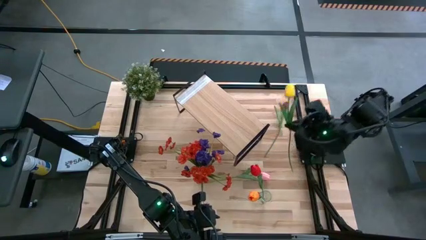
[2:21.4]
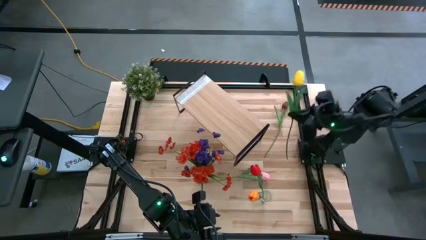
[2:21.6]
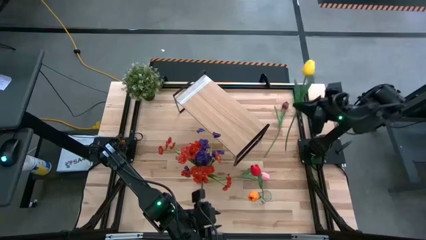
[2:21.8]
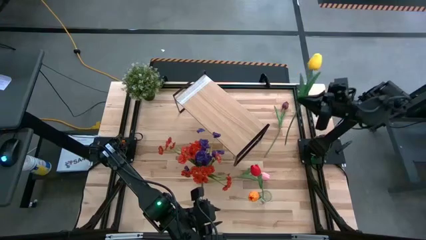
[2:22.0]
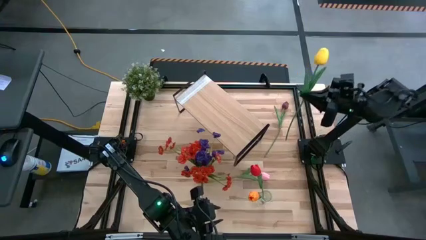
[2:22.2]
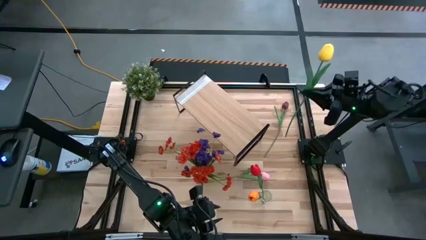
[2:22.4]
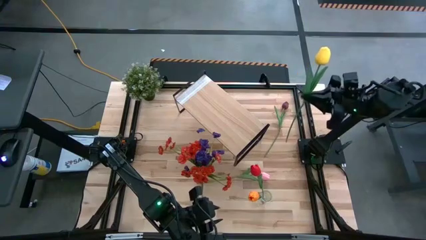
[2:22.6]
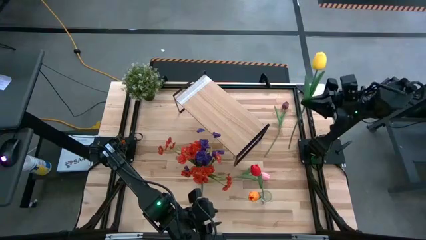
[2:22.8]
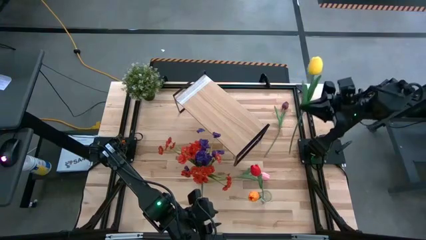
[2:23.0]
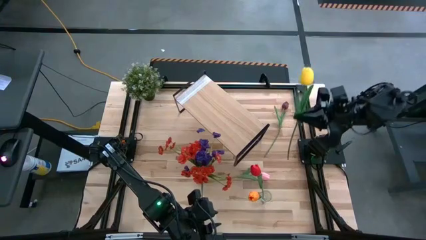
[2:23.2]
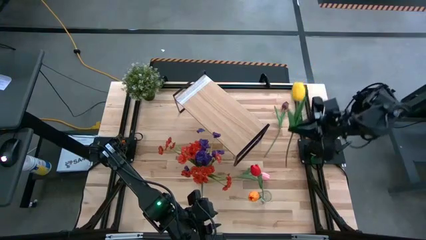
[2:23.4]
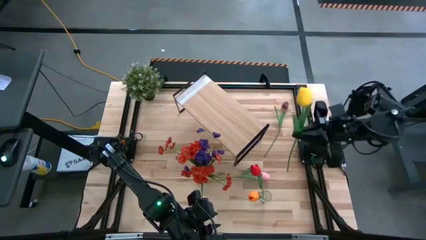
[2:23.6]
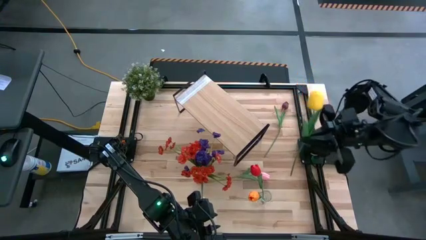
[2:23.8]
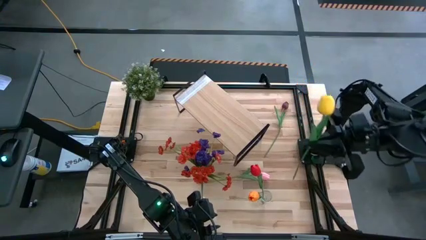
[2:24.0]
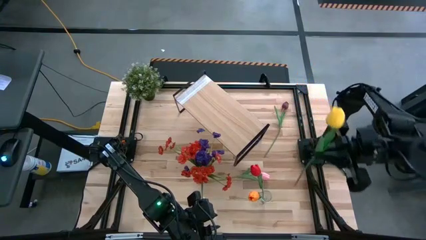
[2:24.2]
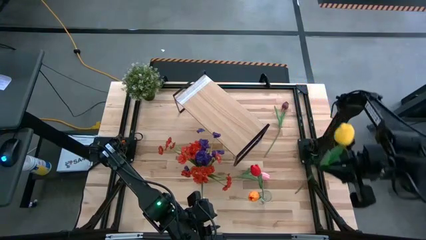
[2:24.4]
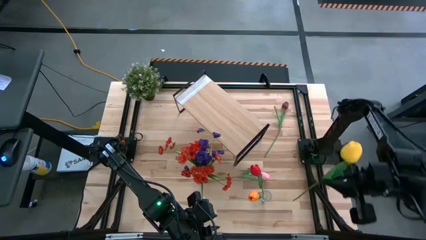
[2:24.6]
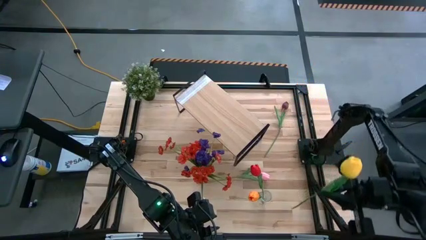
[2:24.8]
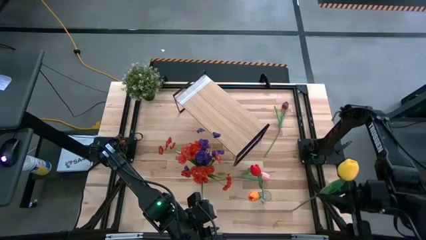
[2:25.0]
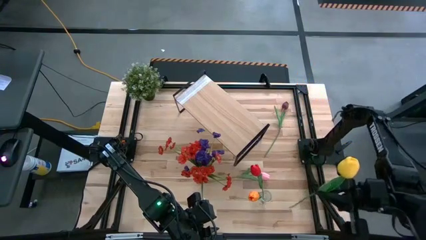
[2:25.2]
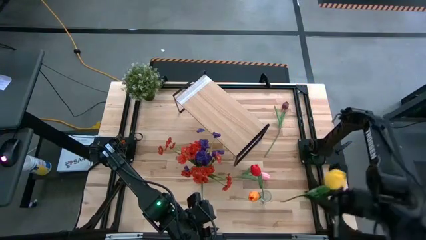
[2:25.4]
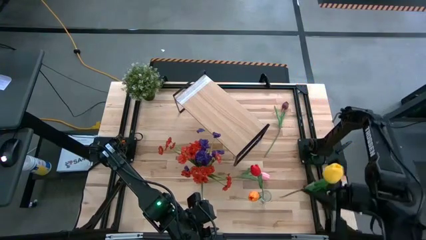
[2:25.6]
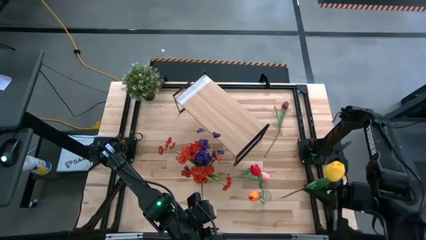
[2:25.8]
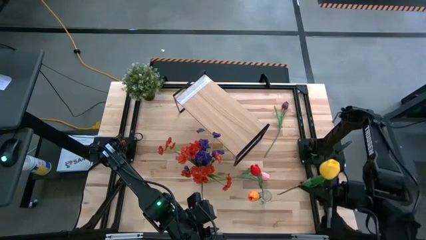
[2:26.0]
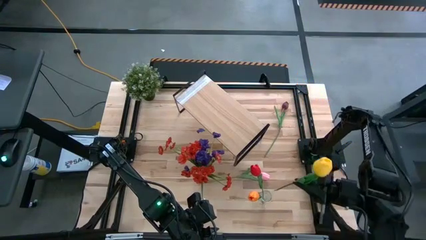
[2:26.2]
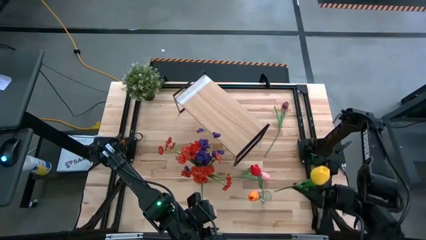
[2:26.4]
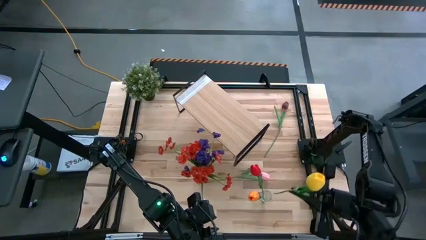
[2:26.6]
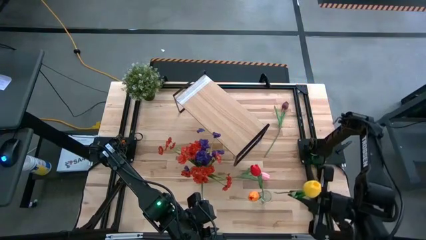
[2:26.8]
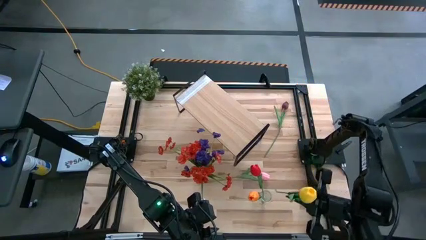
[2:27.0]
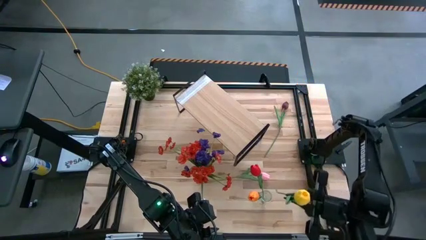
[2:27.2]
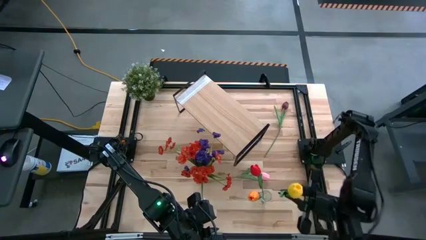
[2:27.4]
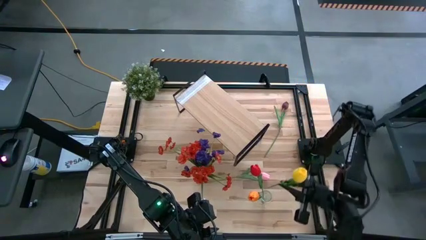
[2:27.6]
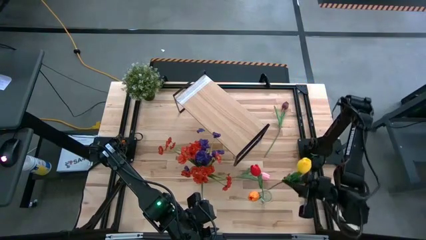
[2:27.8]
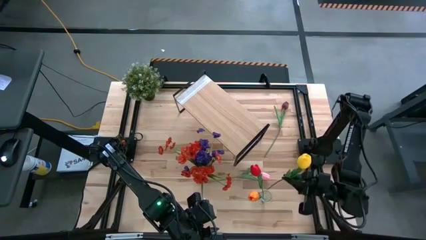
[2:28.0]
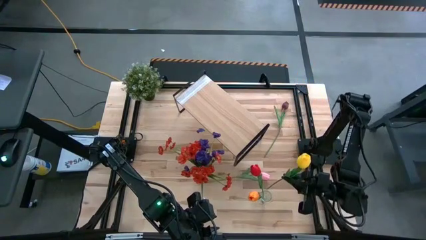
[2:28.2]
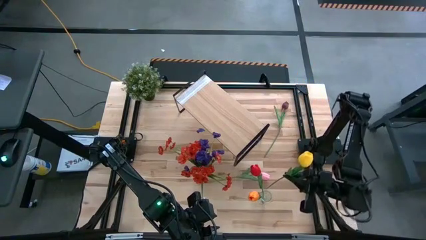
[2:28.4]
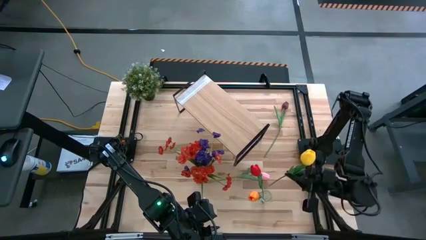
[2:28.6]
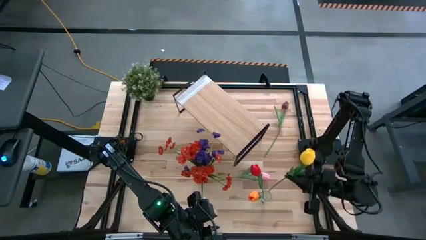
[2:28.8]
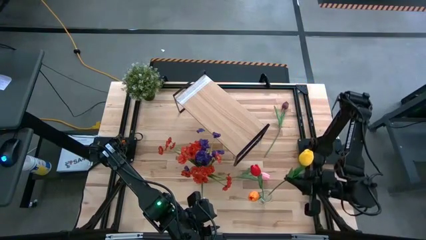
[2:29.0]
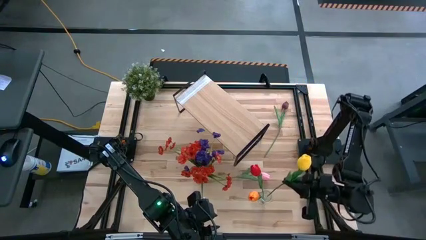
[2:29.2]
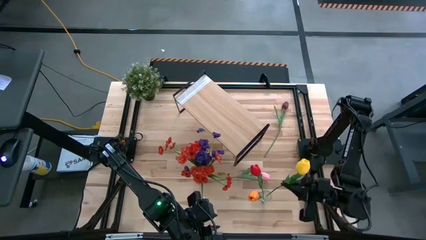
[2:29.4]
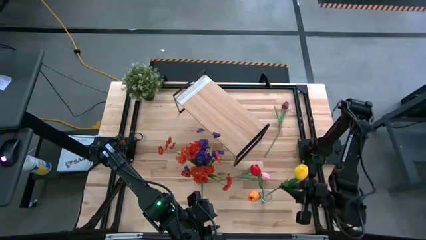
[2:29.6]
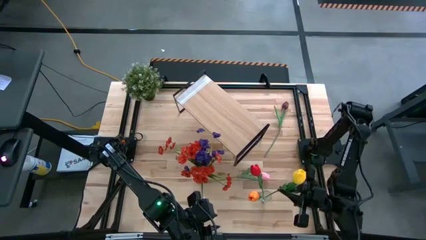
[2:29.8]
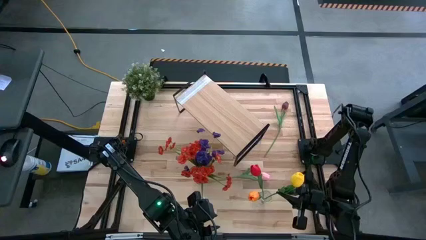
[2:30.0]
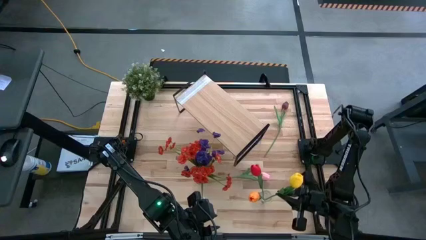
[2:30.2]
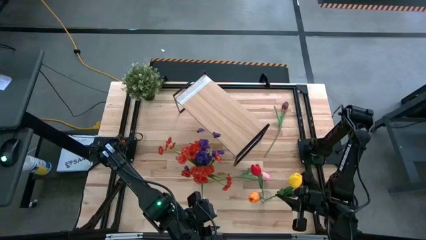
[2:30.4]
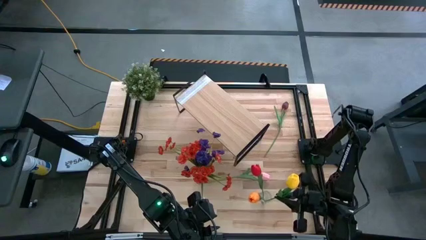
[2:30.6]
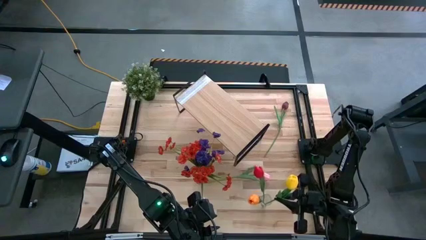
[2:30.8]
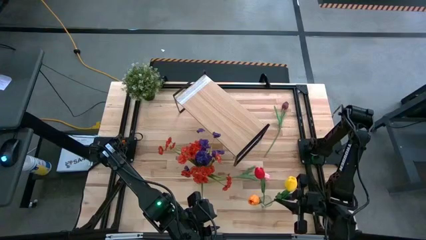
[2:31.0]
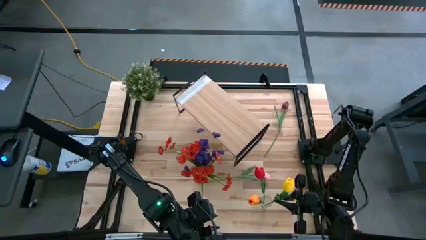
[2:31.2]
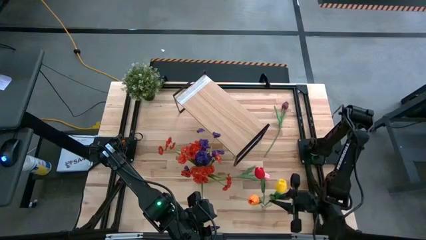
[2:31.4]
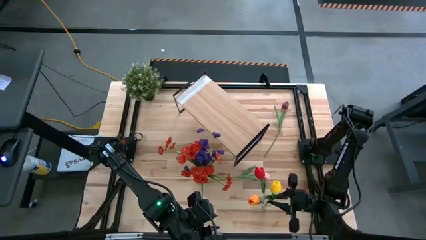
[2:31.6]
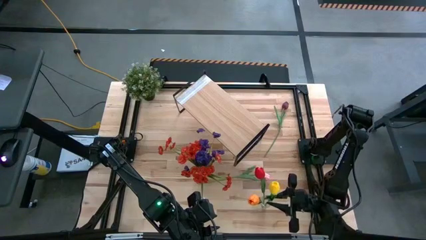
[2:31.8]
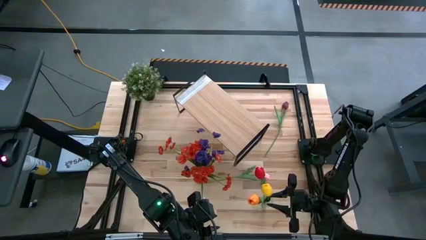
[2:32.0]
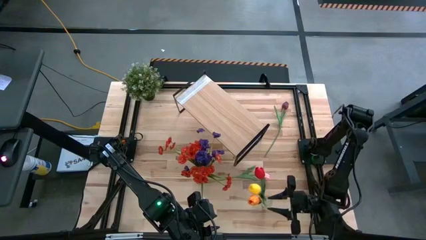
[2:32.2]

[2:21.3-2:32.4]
Task: Pick and place flowers into a vace then onto a shelf
Put the yellow tulip into the right transparent vase
